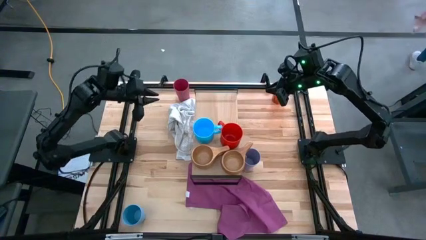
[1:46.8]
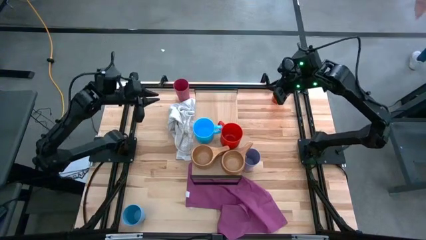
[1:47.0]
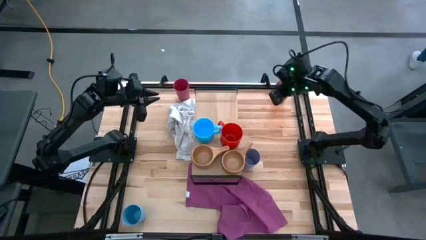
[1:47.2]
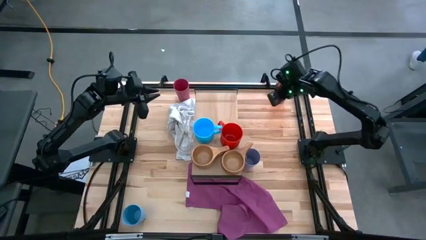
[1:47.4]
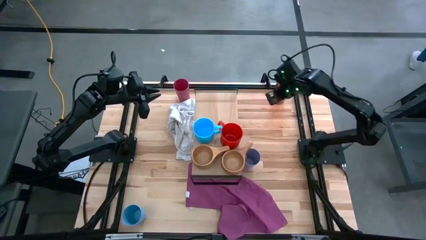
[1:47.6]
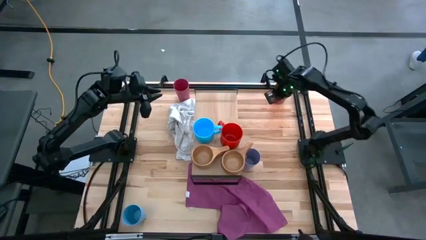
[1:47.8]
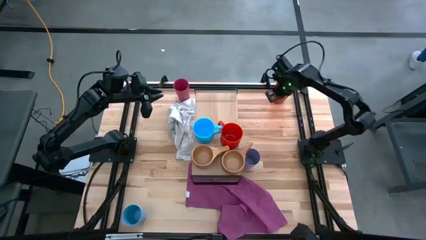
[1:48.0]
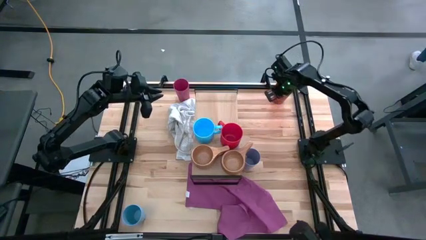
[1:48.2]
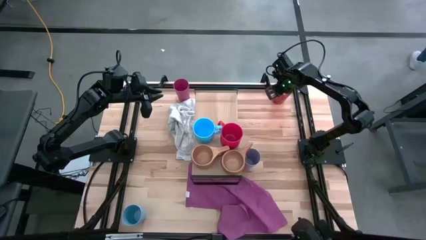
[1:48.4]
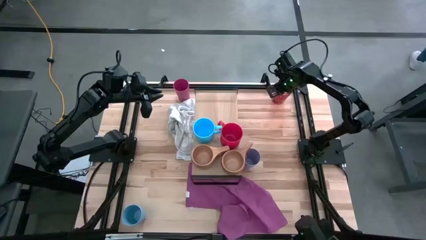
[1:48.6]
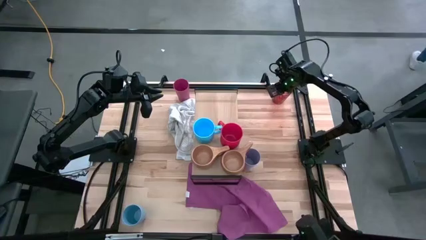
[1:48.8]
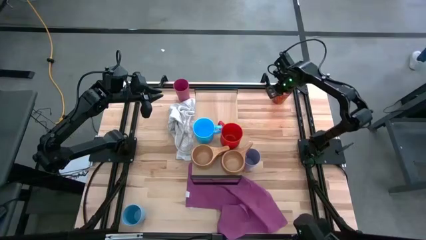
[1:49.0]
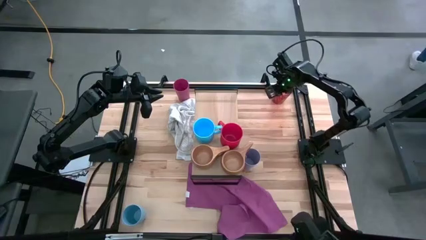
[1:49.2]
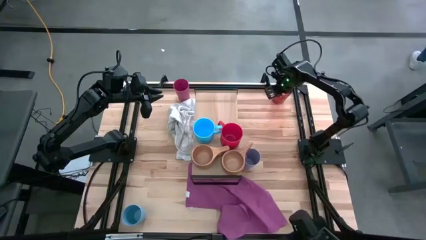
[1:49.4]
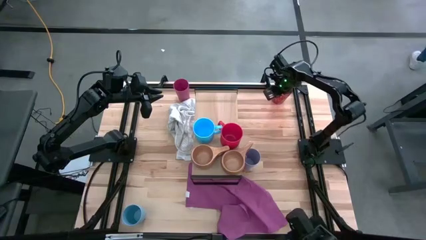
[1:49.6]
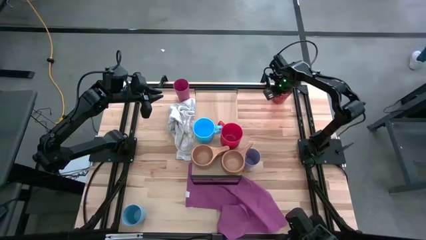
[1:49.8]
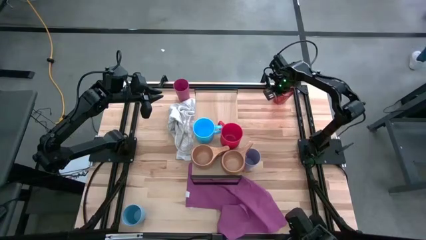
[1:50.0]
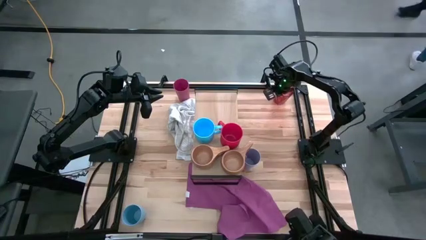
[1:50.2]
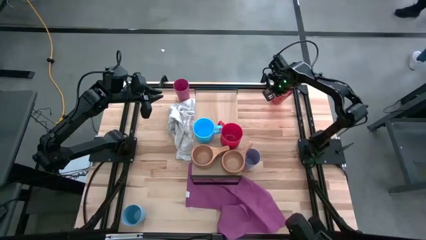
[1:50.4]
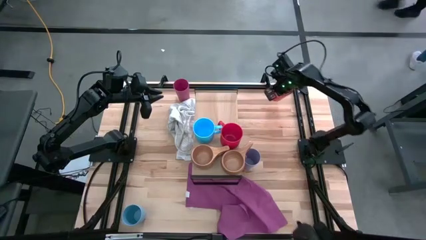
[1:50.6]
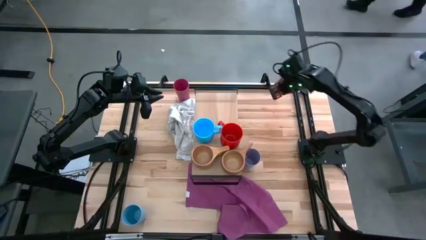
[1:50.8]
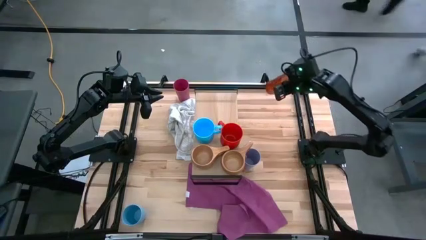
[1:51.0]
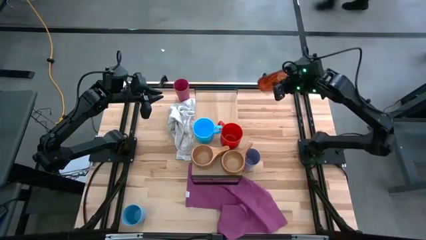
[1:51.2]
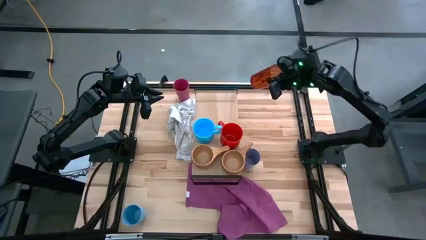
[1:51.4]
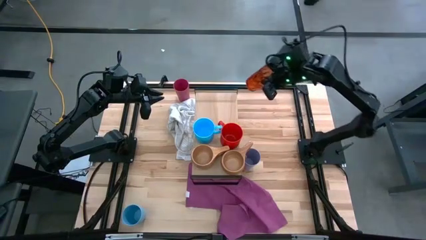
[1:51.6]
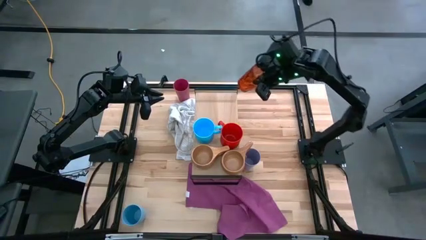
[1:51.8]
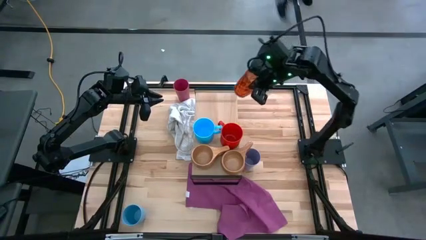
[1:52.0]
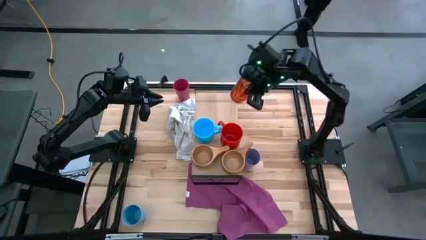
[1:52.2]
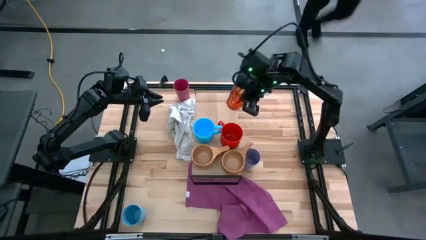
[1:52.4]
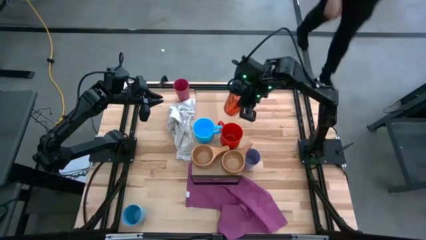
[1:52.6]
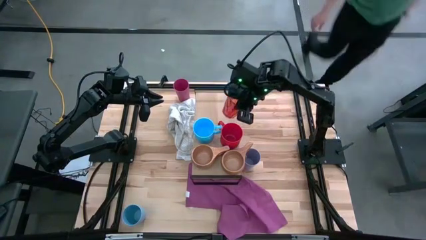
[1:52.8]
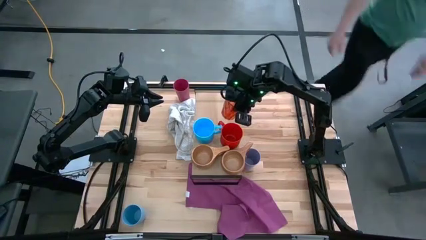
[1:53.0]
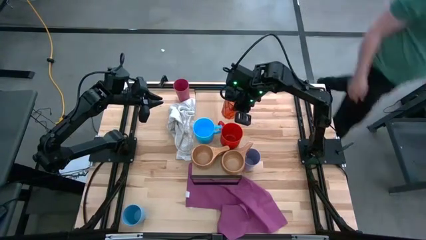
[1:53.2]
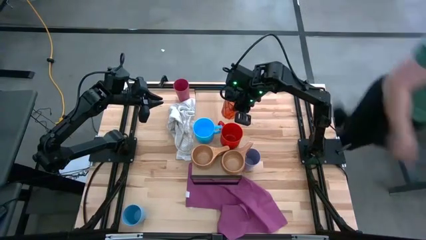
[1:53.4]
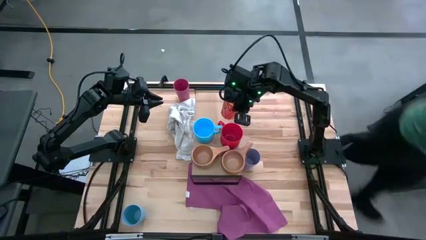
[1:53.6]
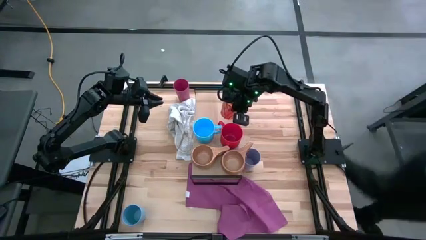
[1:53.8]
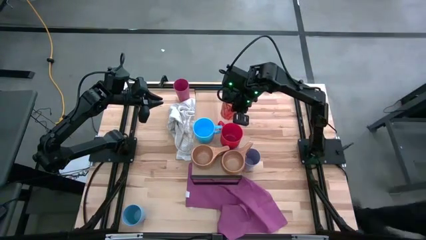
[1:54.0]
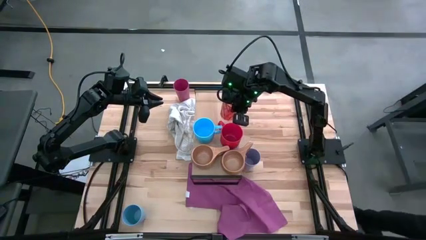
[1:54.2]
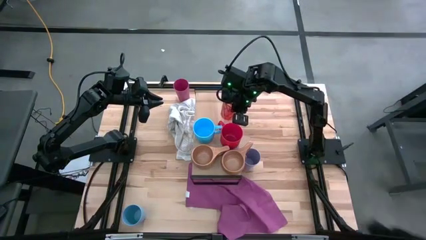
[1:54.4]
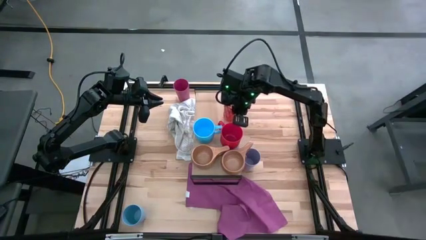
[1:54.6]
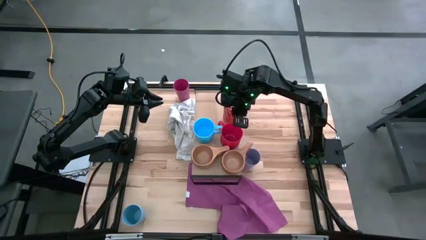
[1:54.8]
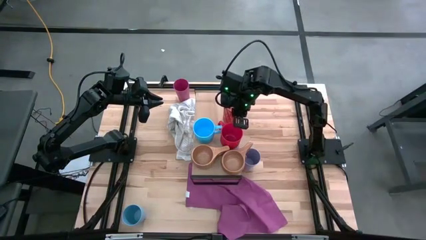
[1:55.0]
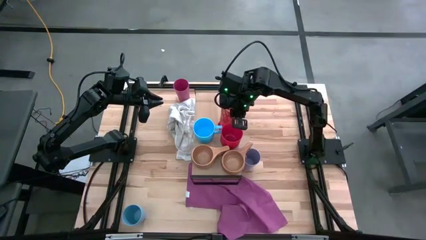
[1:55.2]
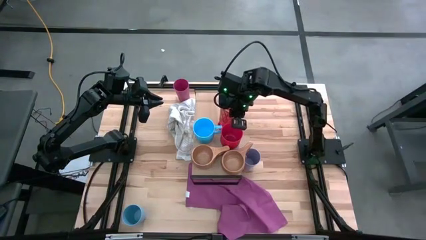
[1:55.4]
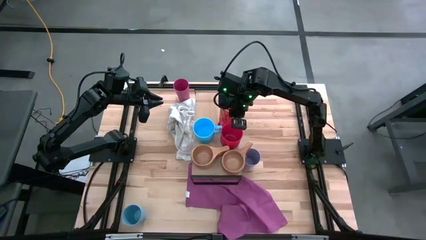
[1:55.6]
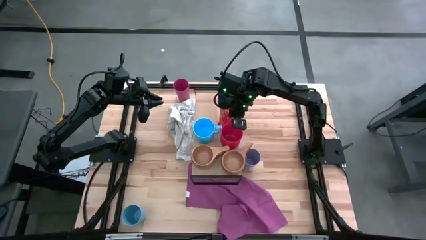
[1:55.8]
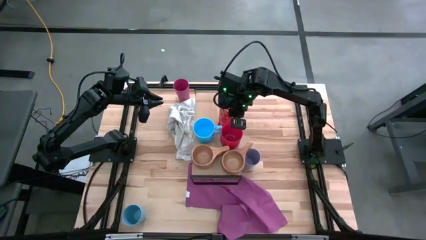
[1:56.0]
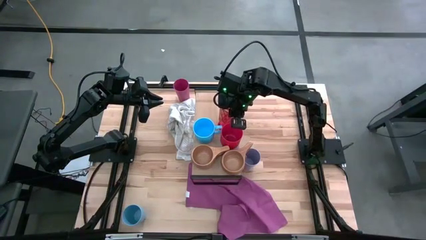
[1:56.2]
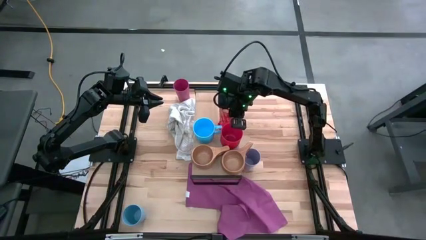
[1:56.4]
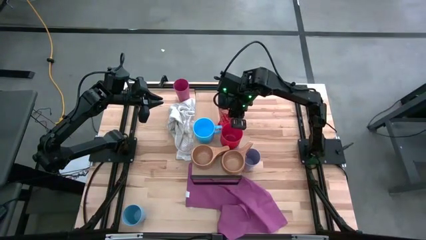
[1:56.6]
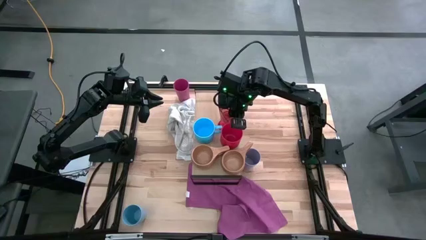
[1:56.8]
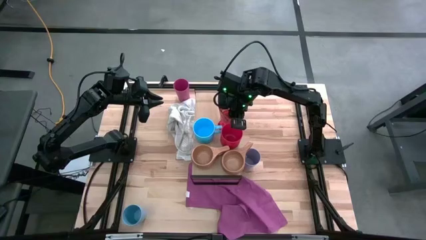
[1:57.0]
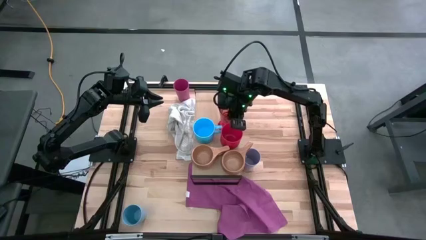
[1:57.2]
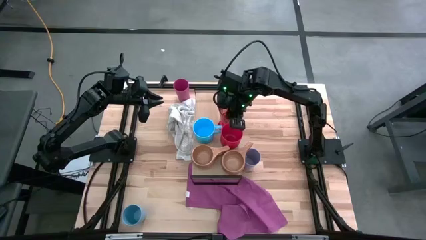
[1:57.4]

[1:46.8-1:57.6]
Task: Stack small to large cups/mugs on shelf
Put the orange glass on the shelf

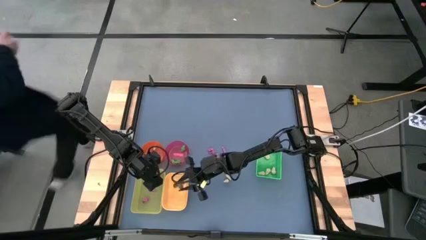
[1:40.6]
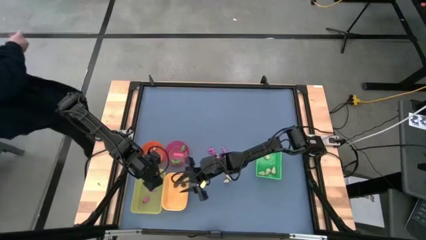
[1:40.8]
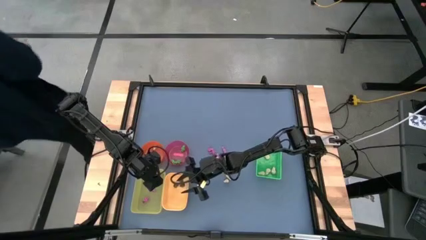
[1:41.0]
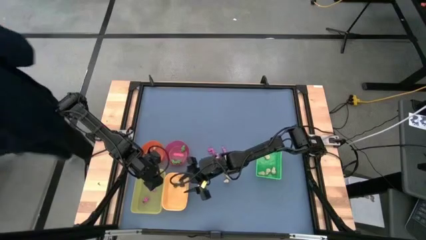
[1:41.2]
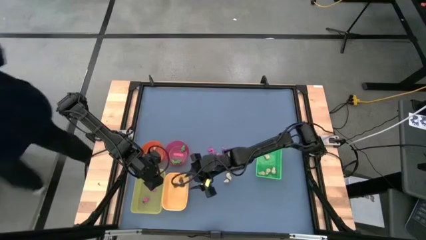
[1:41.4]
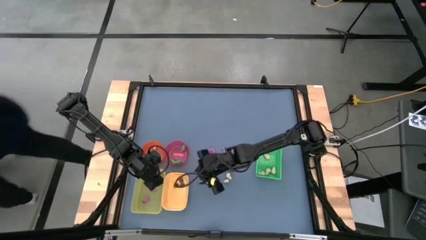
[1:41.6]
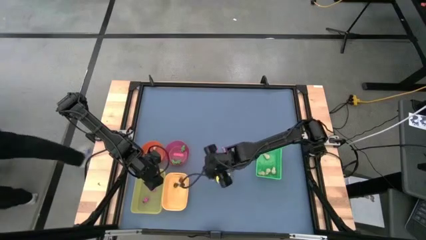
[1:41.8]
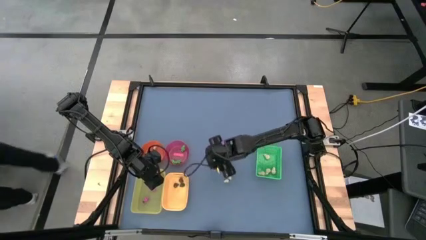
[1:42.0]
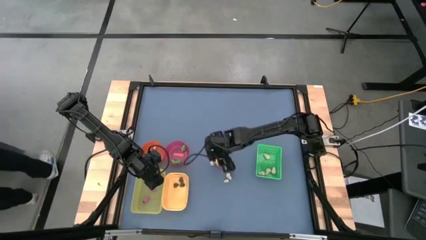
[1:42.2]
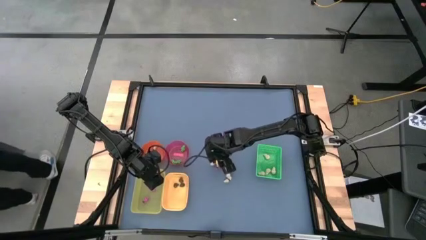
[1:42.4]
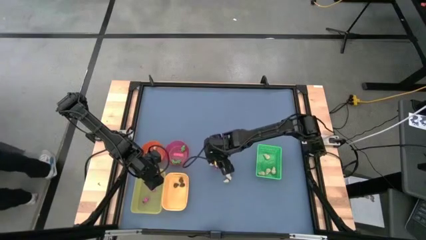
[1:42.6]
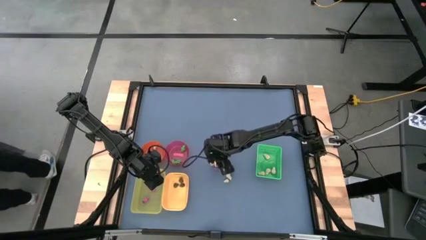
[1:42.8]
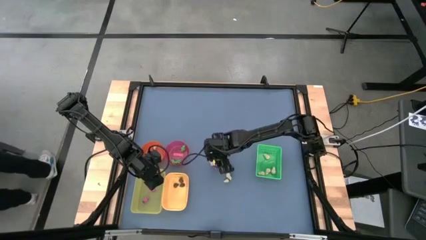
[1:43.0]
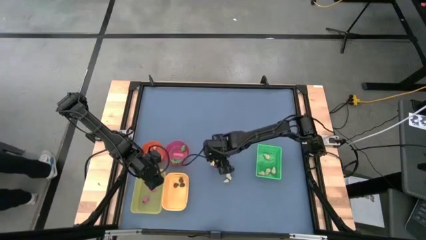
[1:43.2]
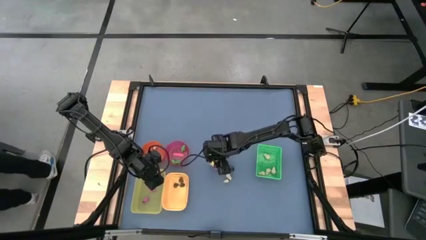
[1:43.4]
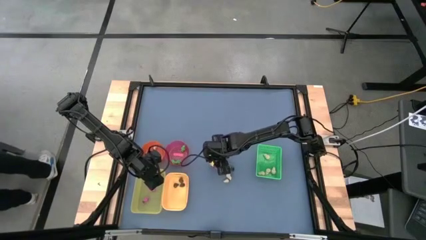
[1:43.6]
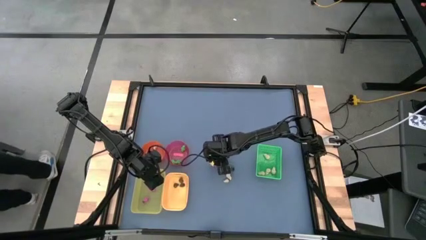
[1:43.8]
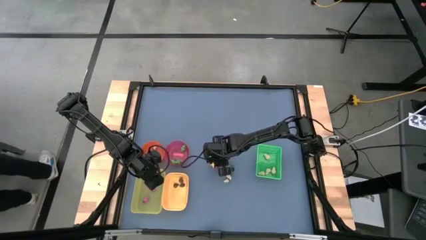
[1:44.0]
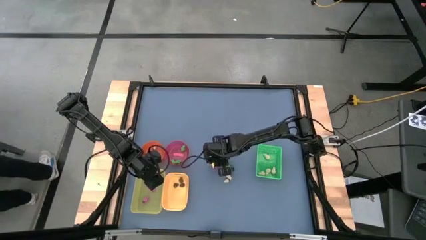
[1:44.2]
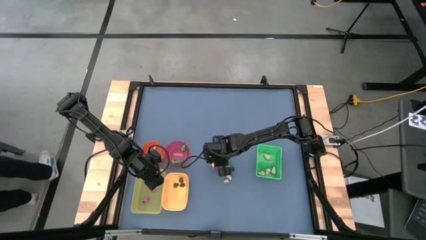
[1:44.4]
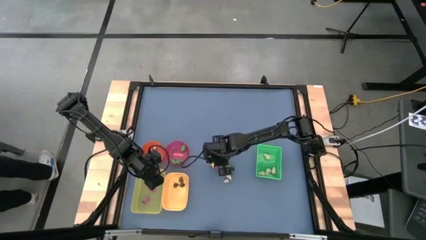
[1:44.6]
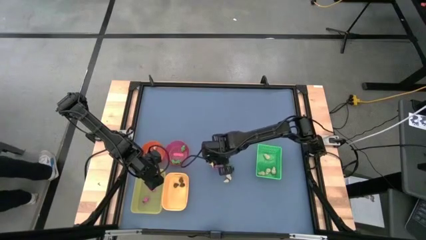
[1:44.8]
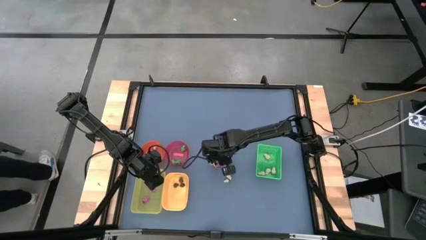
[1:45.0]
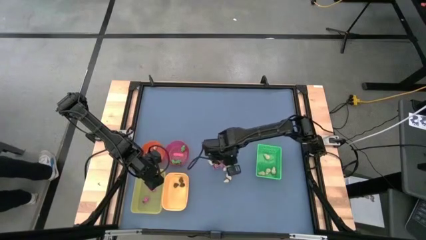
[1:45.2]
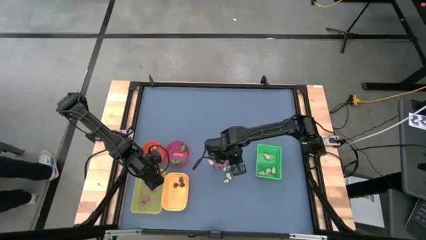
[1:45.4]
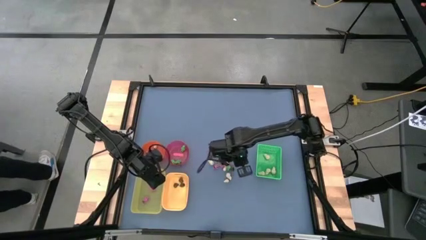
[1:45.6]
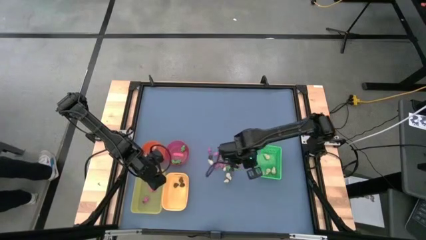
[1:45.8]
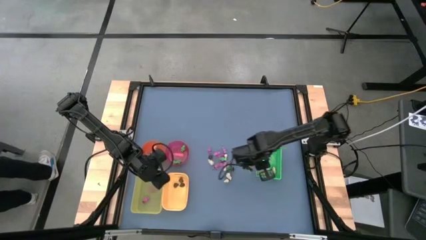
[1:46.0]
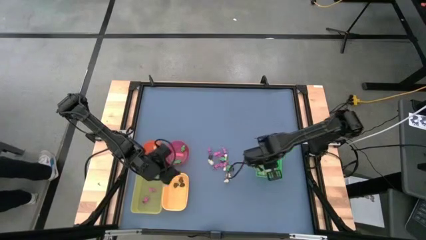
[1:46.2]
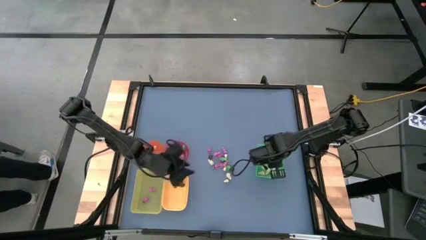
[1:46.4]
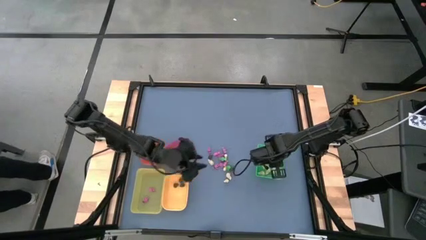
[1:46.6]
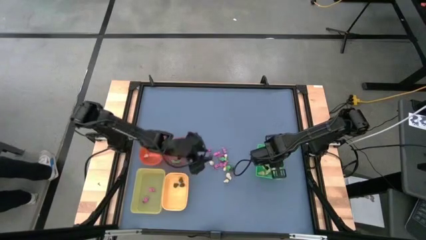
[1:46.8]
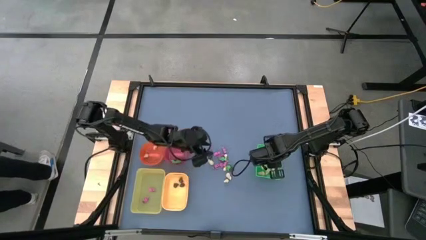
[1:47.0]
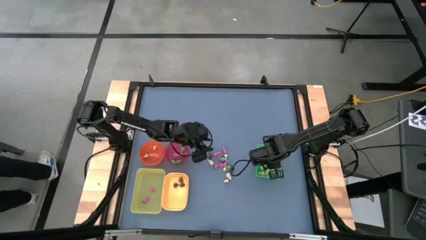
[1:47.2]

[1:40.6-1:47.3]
Task: Sort Halloween decoration
Put white skull toy into the green bin
